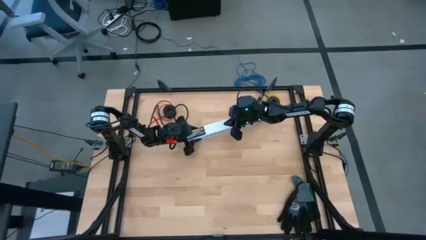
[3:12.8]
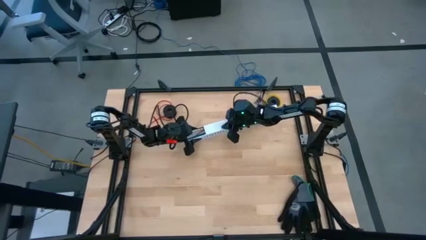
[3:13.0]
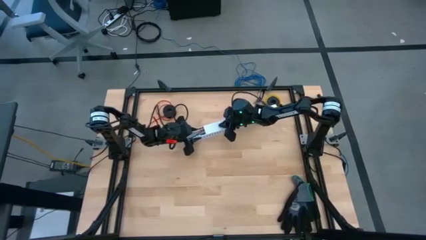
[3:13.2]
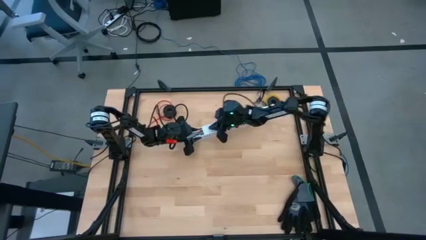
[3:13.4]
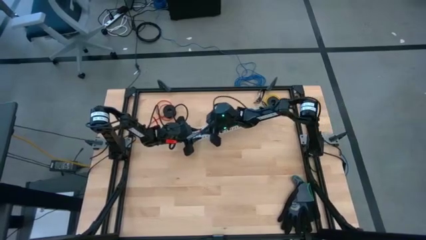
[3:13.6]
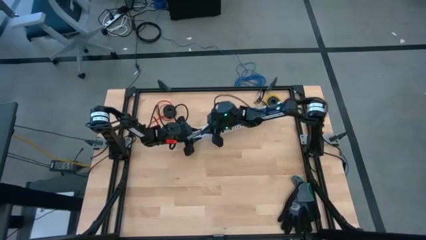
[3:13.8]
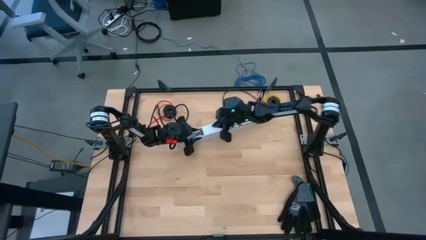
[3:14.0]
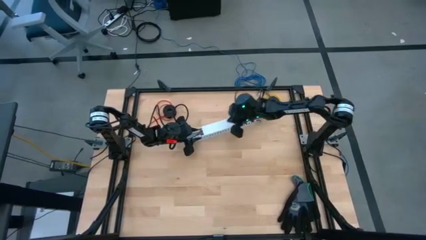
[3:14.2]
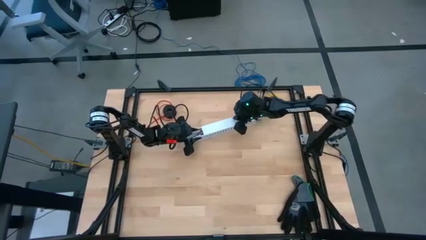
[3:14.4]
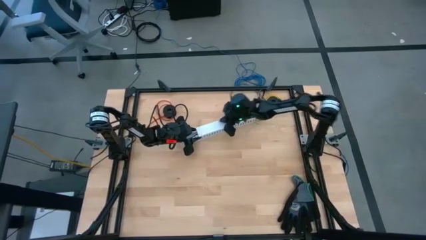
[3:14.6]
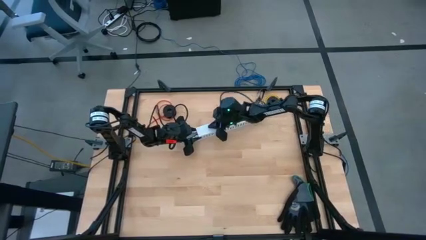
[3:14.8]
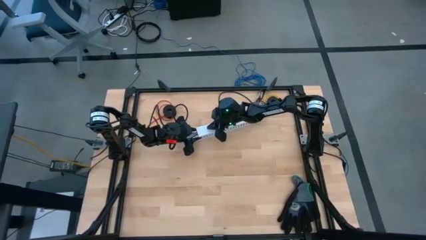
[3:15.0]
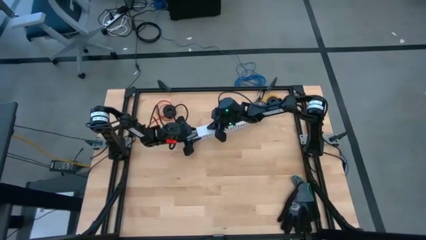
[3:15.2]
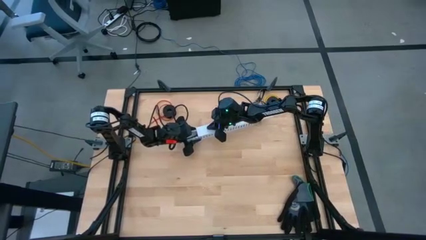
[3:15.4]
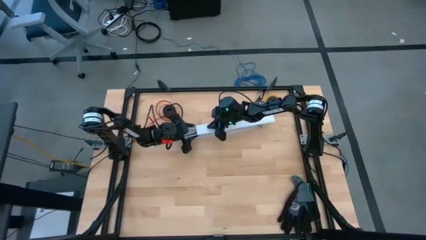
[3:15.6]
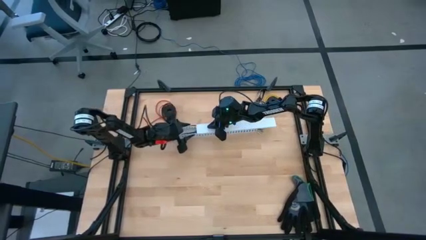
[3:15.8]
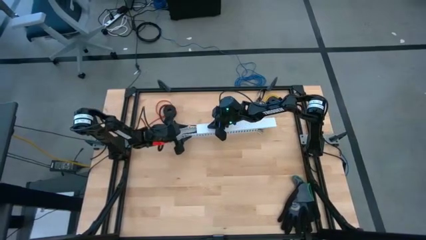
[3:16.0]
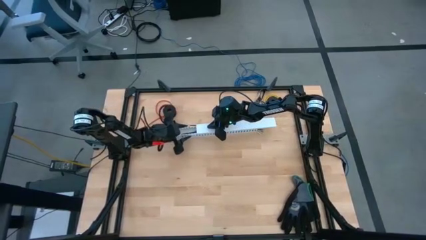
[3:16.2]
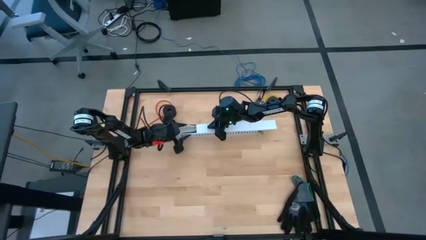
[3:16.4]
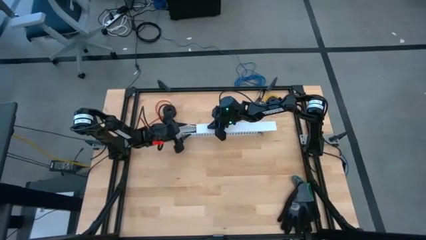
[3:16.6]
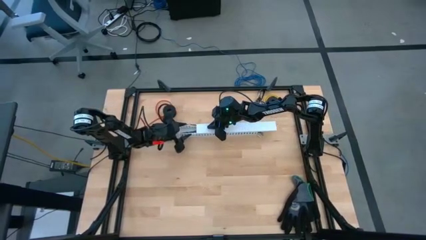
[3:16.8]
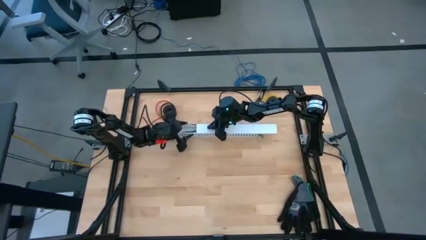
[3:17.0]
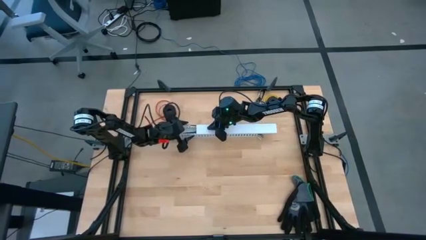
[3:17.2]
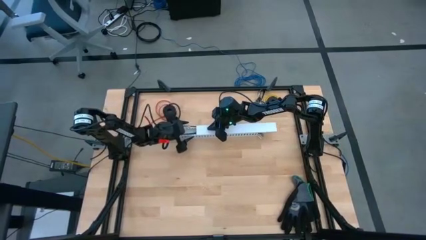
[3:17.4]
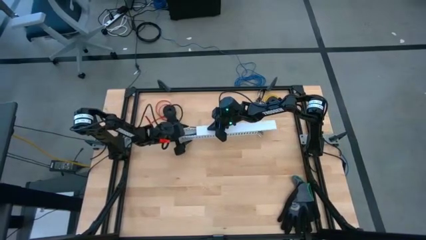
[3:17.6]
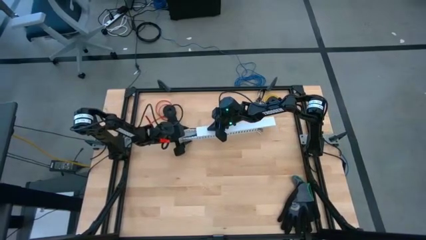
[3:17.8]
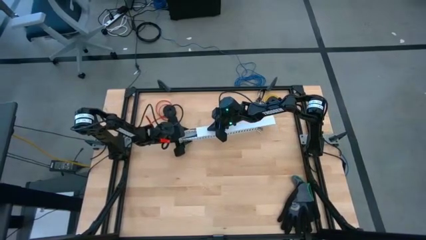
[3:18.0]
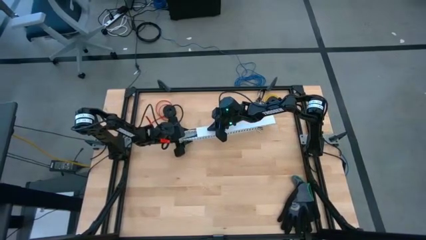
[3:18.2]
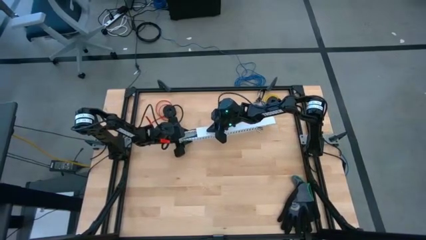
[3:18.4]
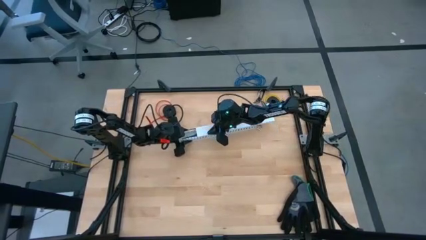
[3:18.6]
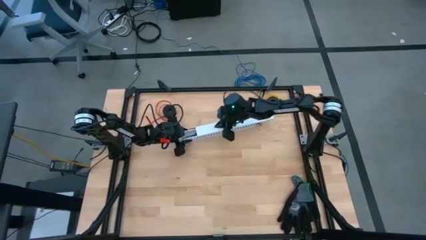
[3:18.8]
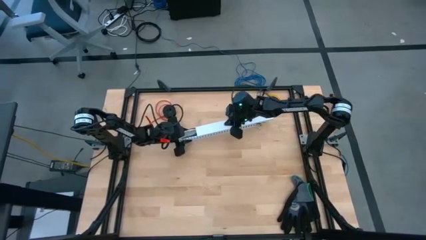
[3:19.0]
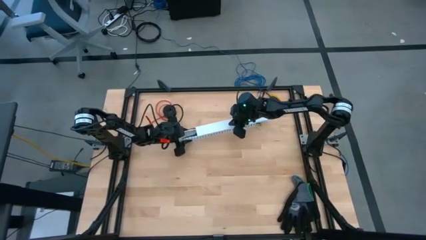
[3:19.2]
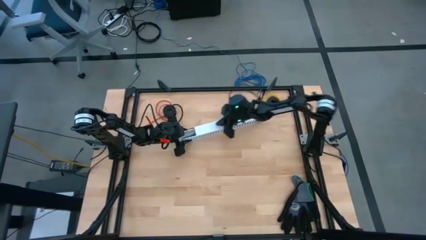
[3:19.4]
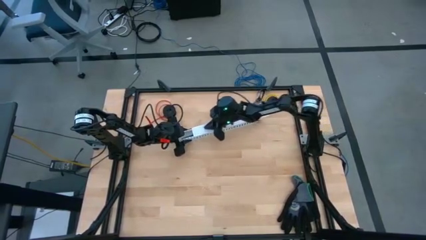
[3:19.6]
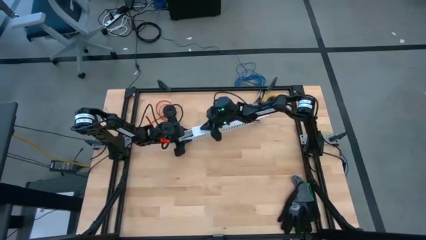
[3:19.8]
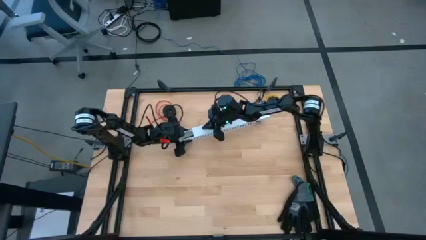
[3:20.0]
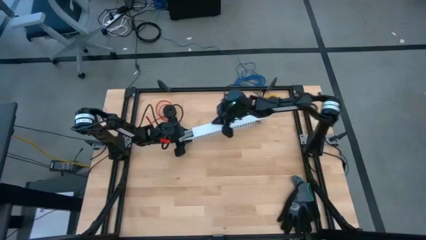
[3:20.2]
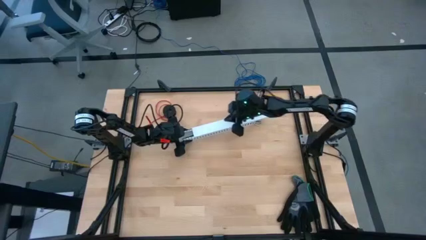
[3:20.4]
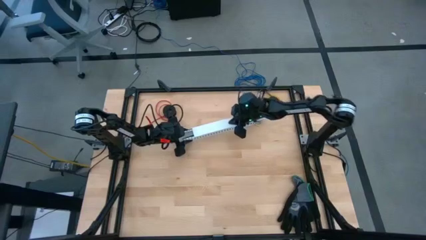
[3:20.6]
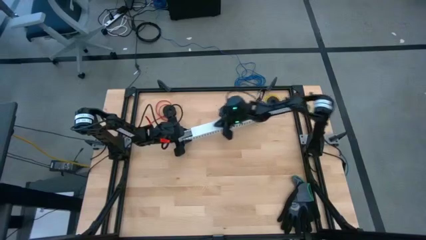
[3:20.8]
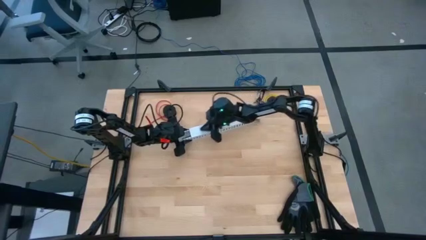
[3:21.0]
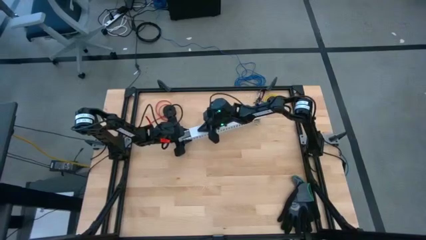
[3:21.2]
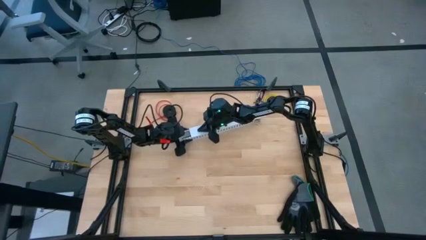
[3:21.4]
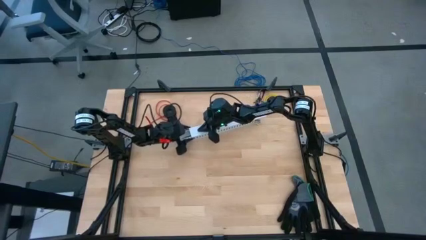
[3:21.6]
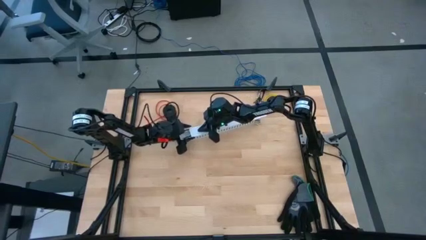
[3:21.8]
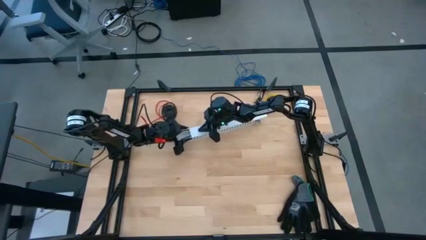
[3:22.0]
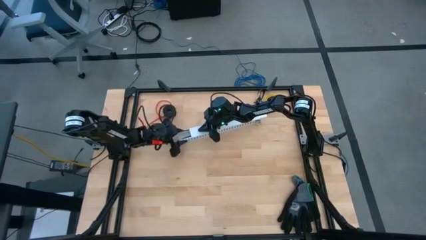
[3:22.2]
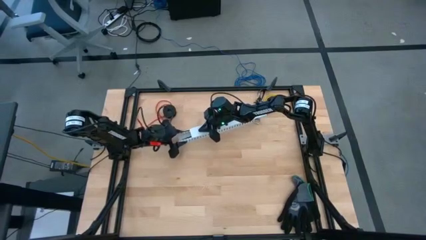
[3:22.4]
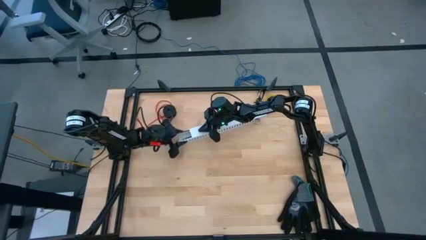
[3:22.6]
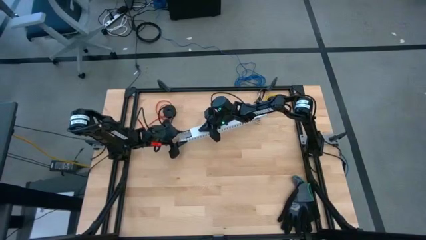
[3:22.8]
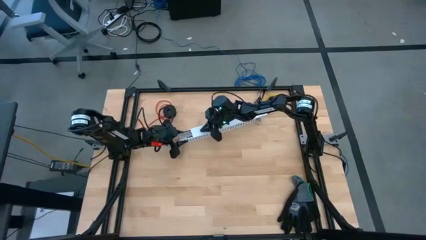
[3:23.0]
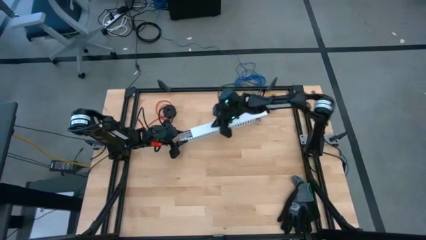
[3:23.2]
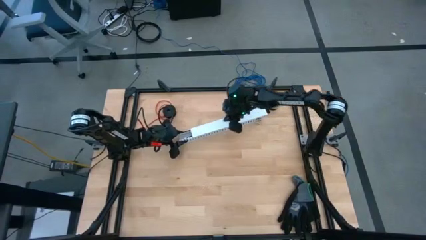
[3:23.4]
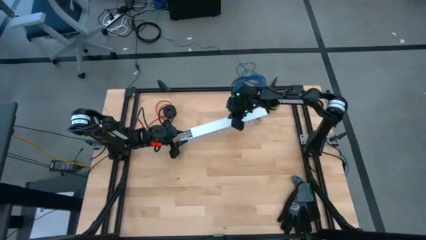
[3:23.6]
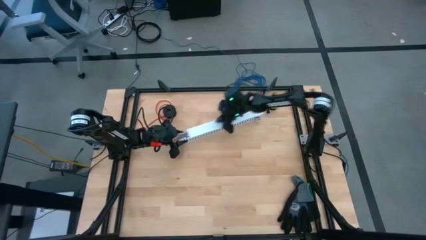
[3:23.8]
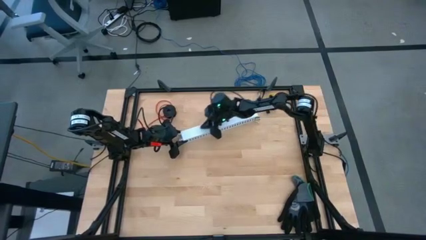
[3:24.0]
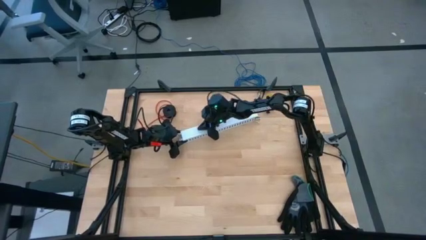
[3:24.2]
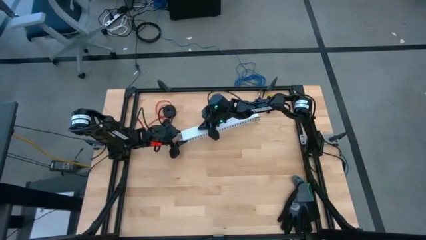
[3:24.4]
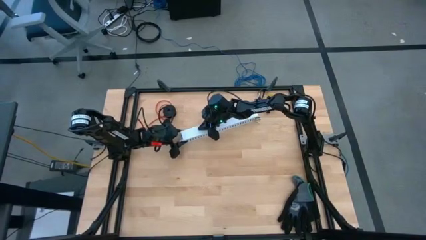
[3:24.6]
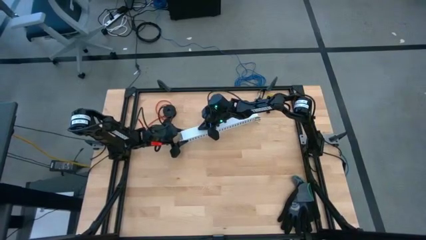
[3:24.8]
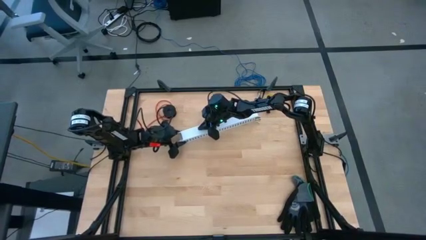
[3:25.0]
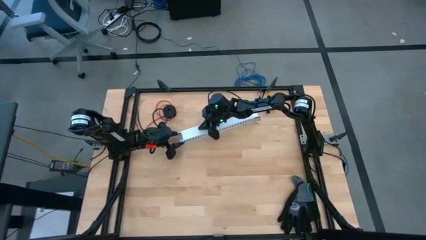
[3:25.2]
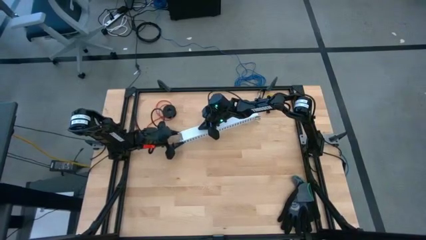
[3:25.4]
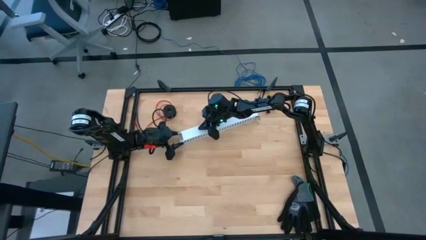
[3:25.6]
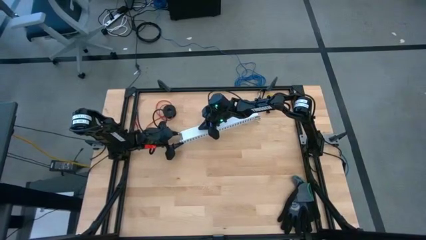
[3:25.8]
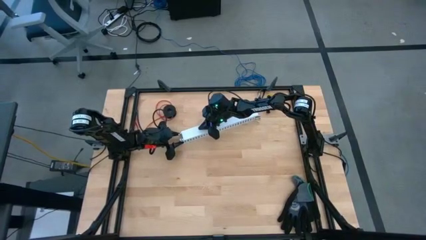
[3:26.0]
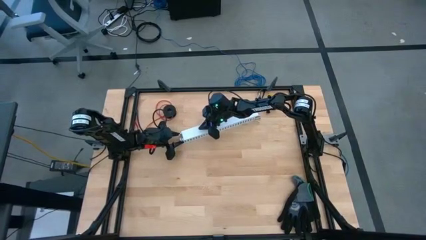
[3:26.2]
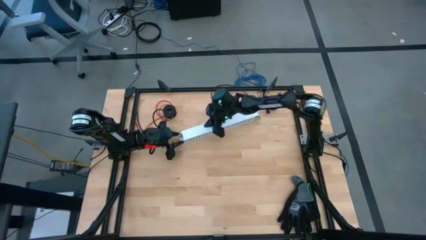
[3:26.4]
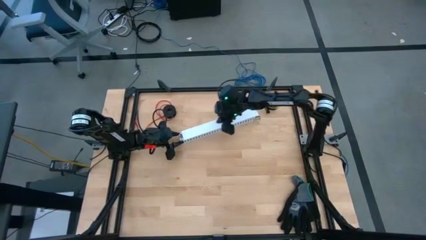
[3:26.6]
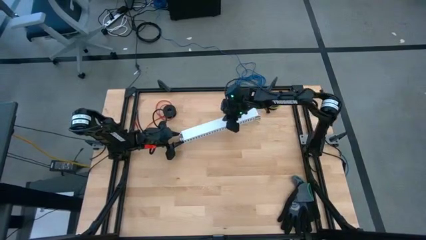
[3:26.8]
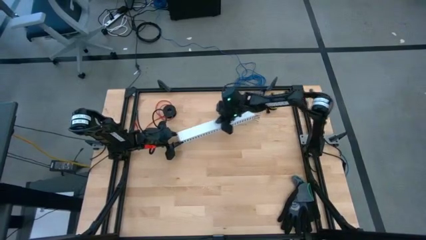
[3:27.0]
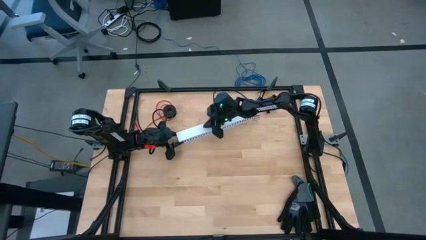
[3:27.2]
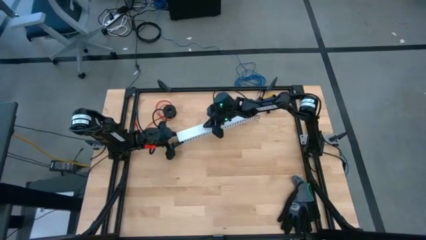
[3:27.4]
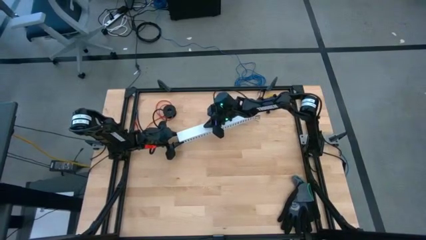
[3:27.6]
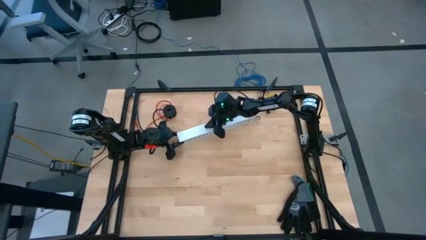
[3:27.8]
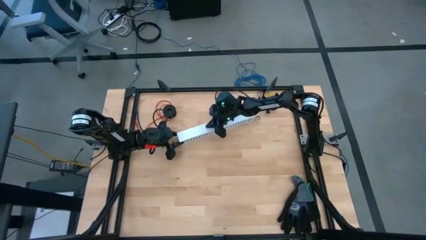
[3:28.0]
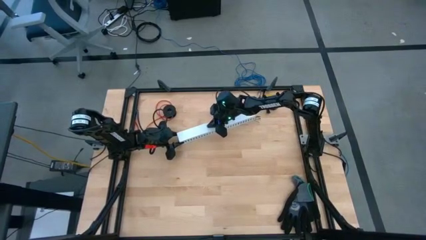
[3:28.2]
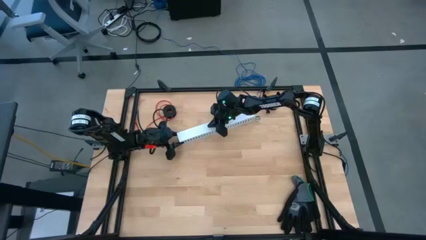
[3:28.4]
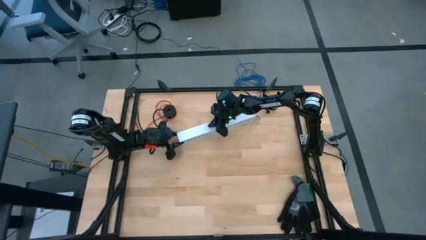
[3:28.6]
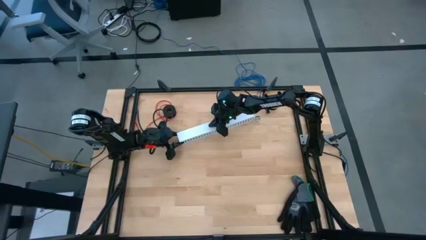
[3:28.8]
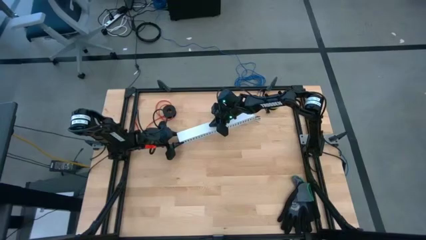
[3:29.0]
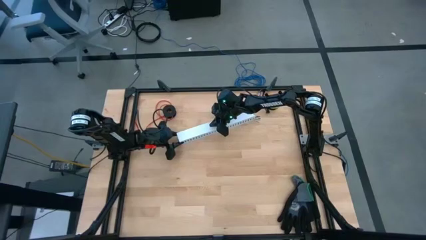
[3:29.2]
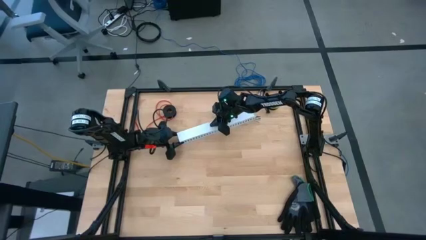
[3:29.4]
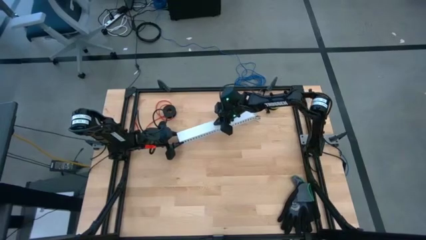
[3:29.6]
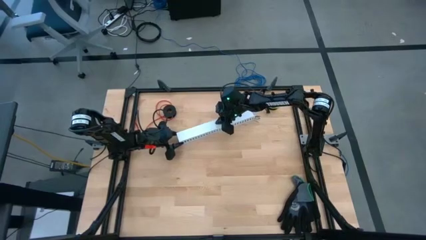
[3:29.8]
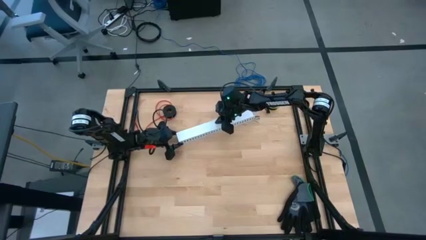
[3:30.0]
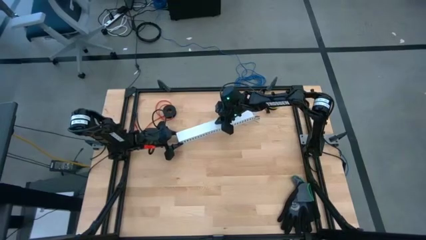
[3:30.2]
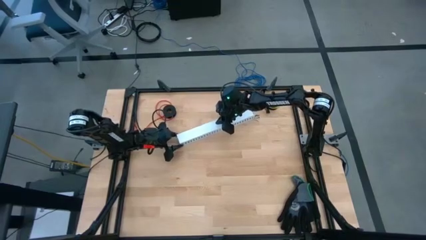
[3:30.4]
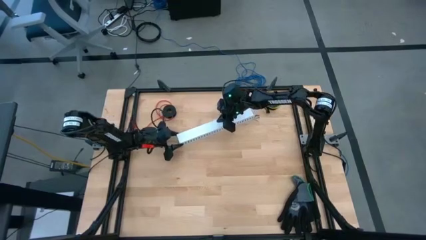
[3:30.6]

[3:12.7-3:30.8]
Task: Ziptie cables
Close the white cable duct
